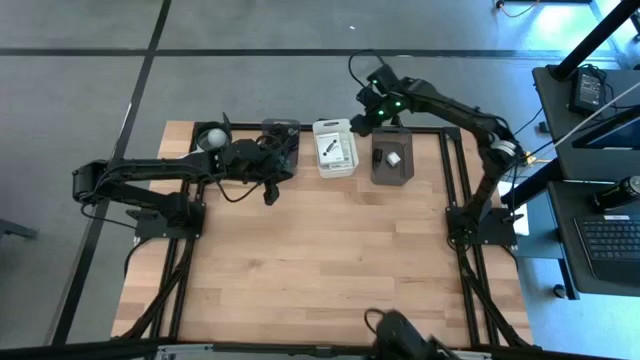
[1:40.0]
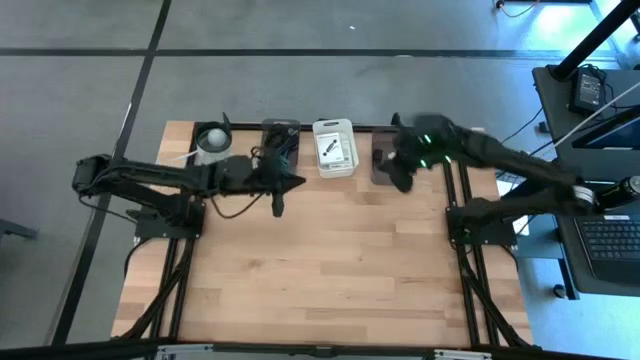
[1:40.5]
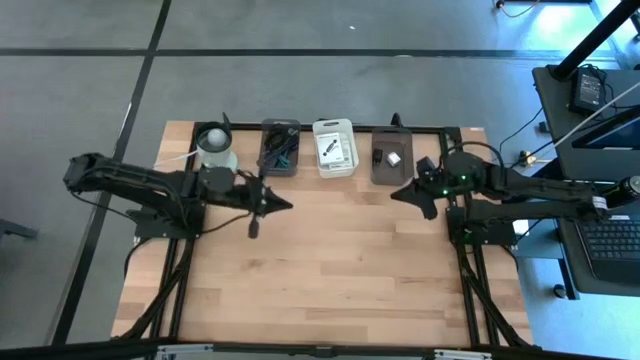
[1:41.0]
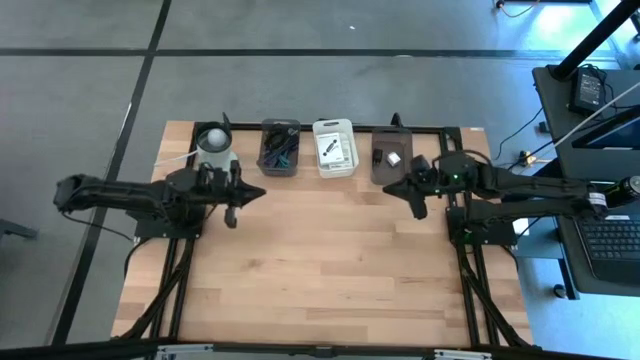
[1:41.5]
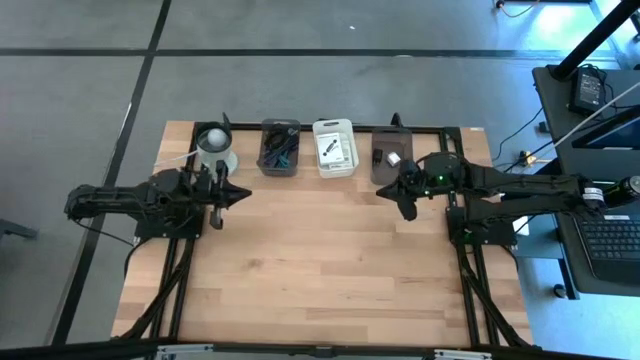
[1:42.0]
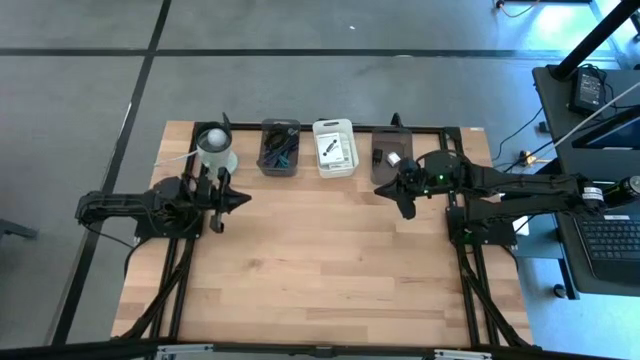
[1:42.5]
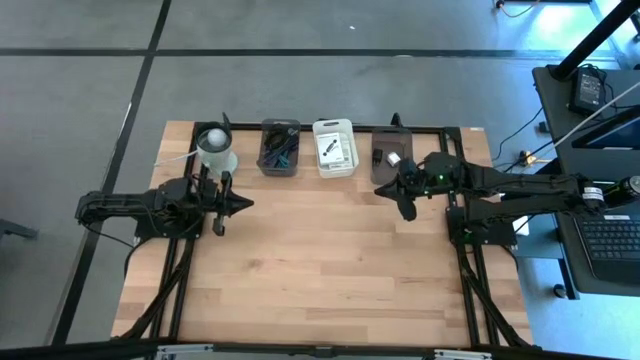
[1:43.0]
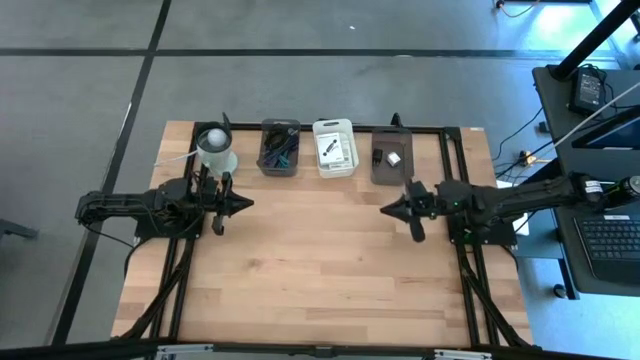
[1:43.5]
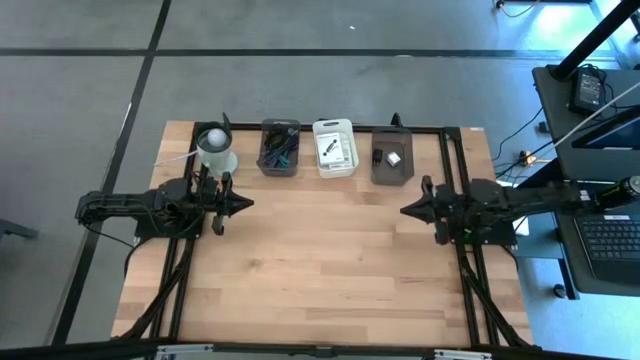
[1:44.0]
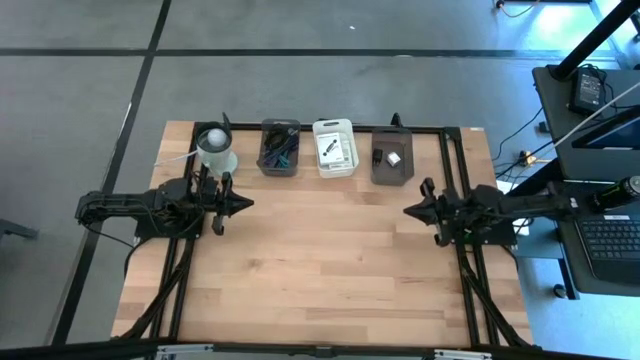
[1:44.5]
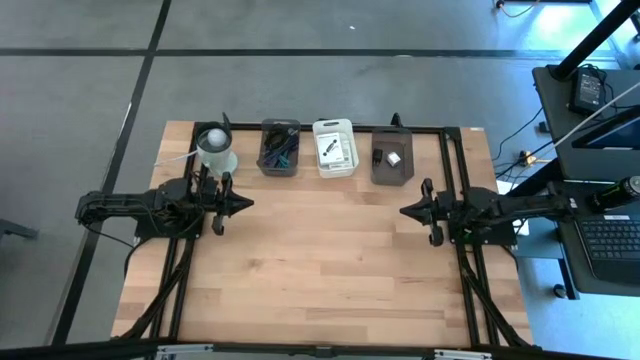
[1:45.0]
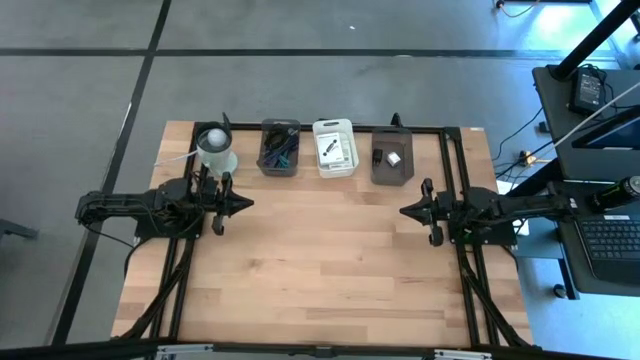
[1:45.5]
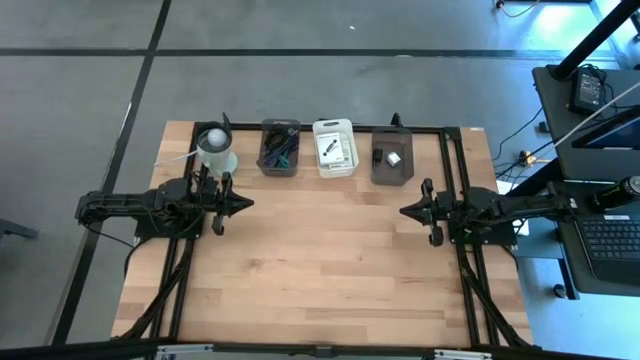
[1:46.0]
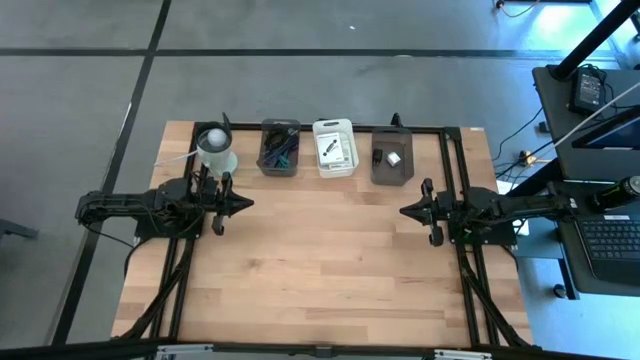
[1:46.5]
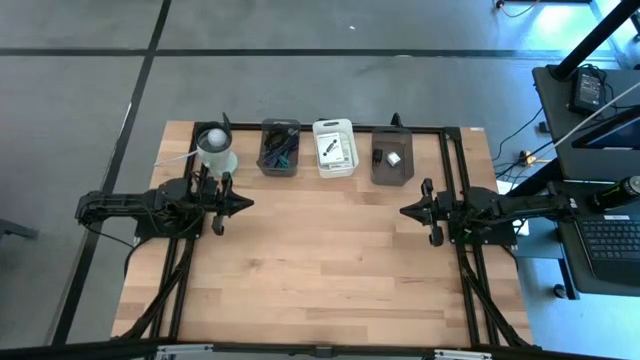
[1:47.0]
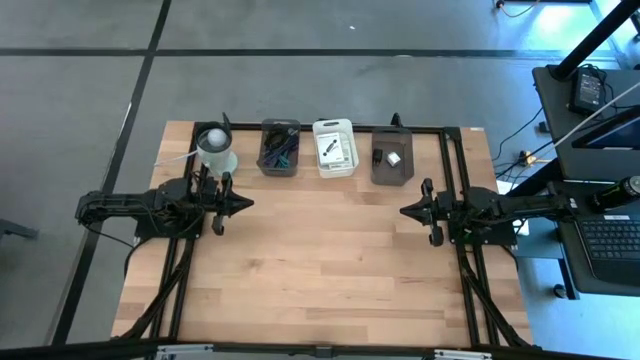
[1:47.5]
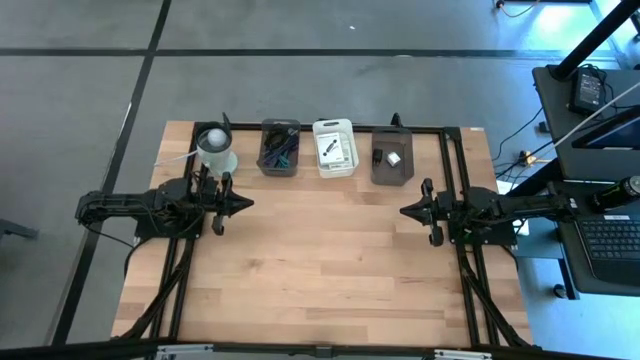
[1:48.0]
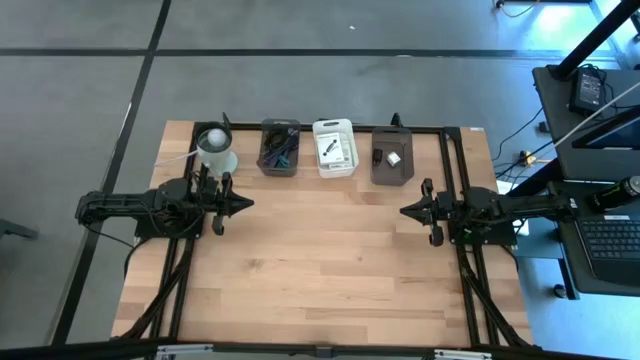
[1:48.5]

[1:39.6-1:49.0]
Task: Pick and place items into bin
Return to Home Position

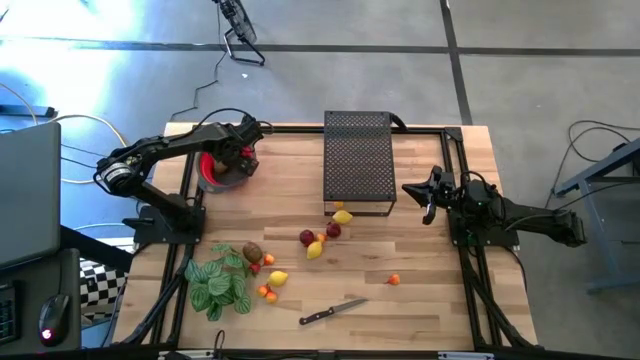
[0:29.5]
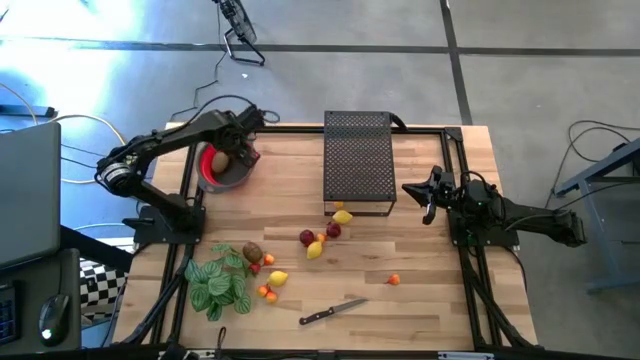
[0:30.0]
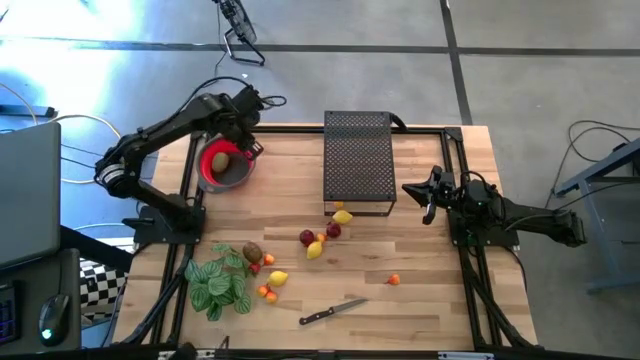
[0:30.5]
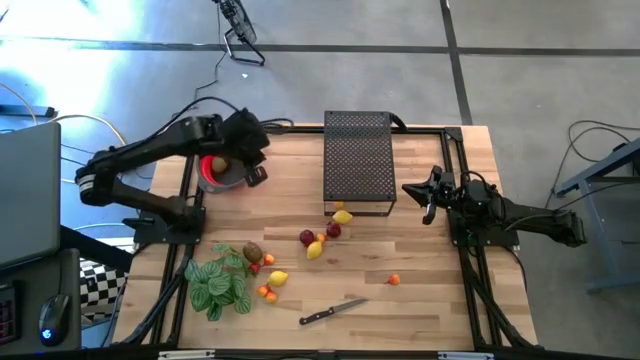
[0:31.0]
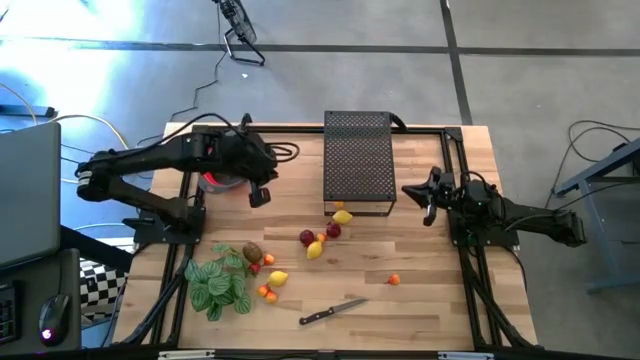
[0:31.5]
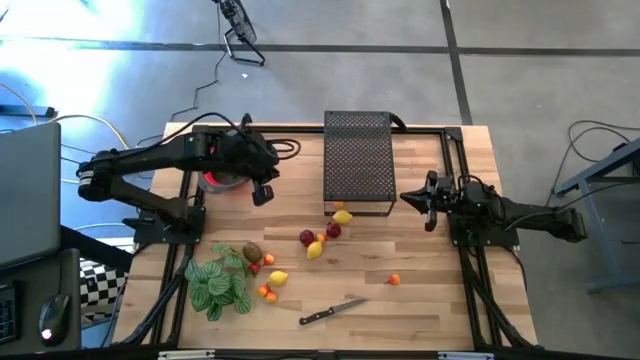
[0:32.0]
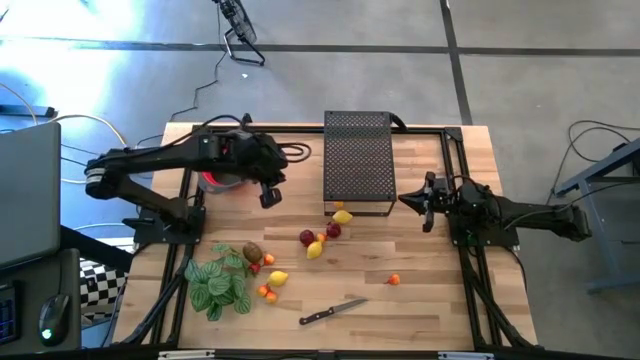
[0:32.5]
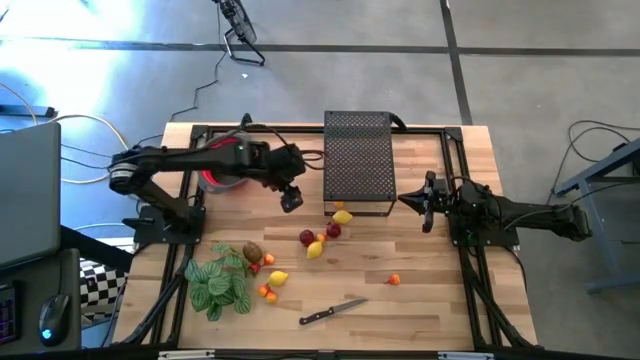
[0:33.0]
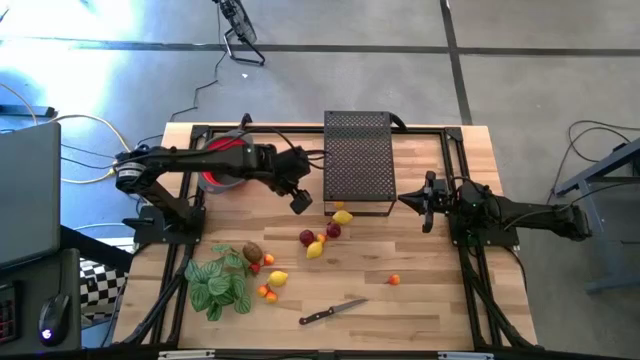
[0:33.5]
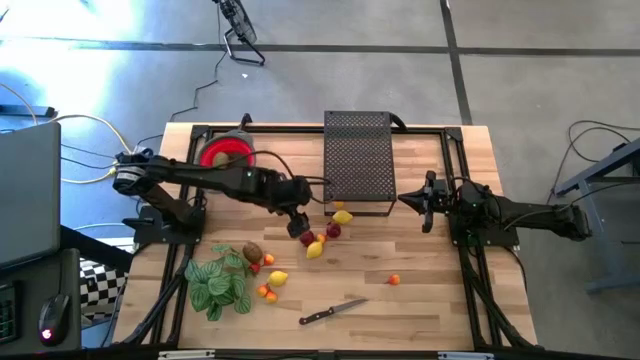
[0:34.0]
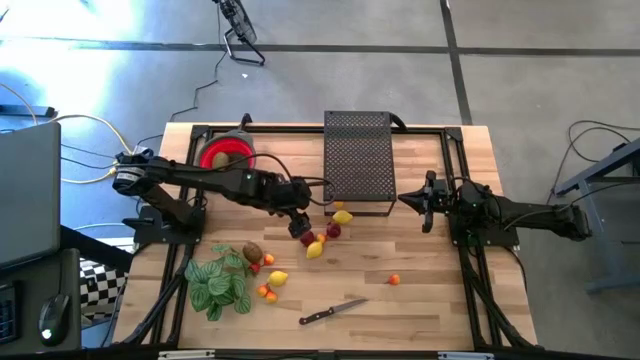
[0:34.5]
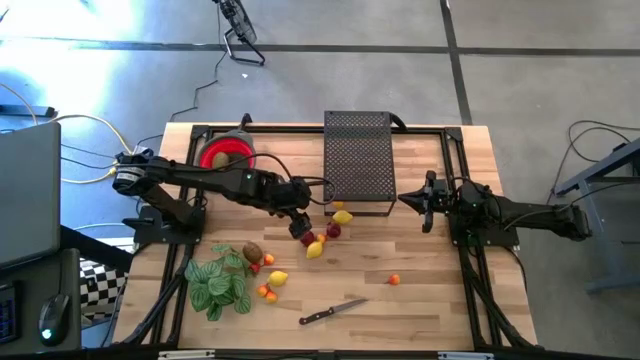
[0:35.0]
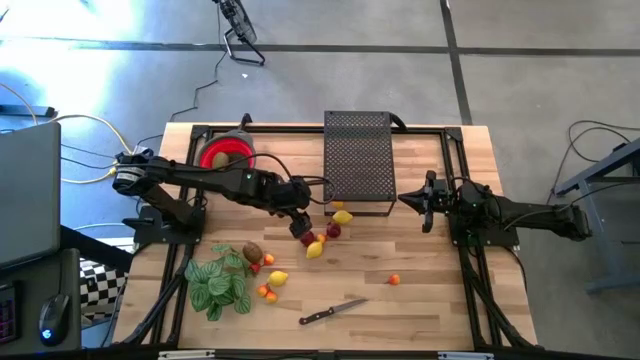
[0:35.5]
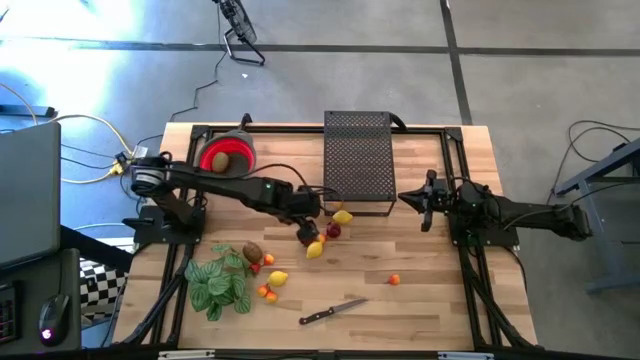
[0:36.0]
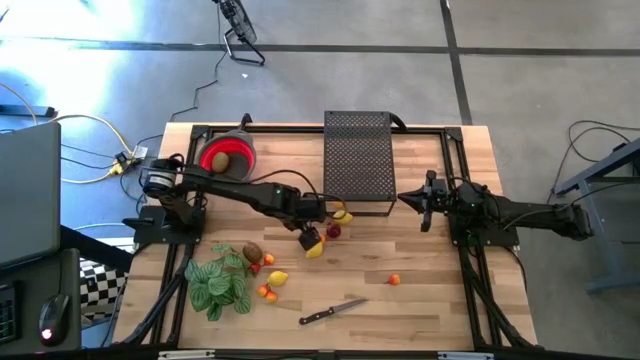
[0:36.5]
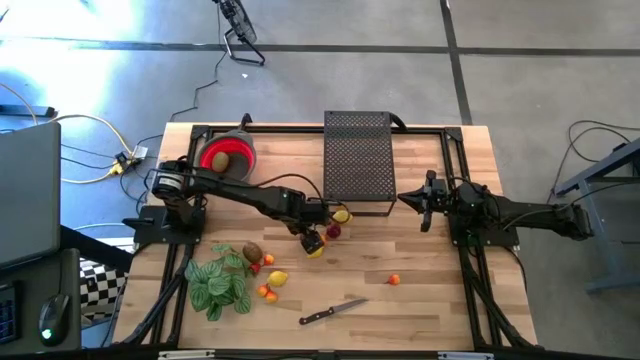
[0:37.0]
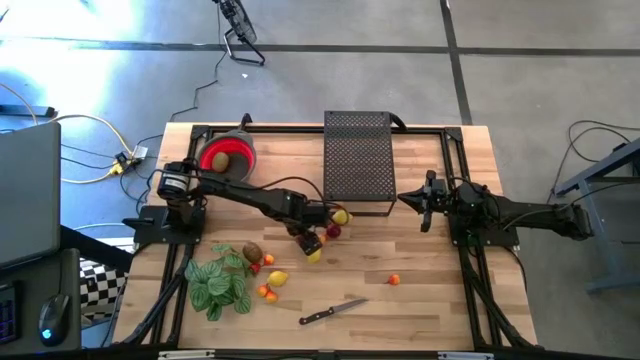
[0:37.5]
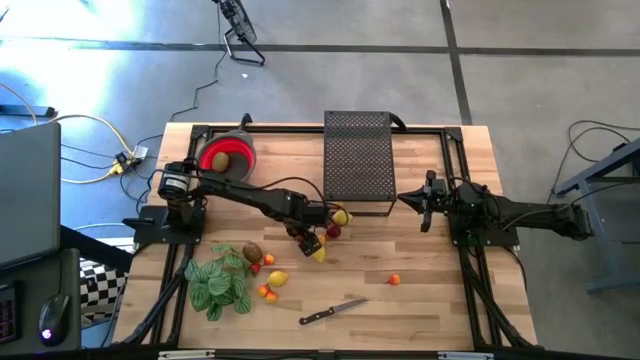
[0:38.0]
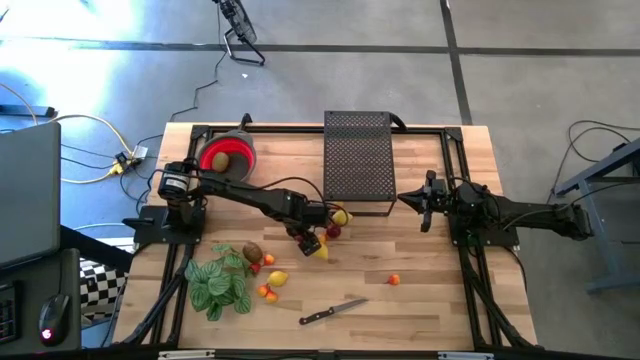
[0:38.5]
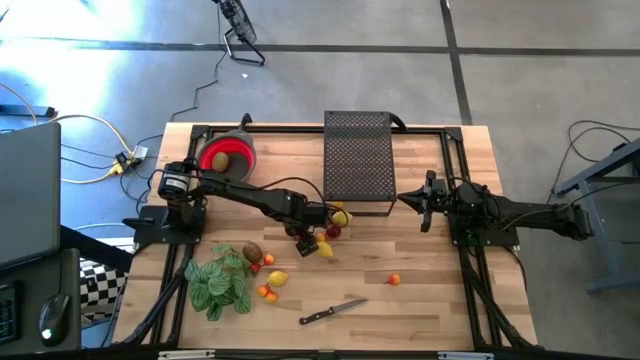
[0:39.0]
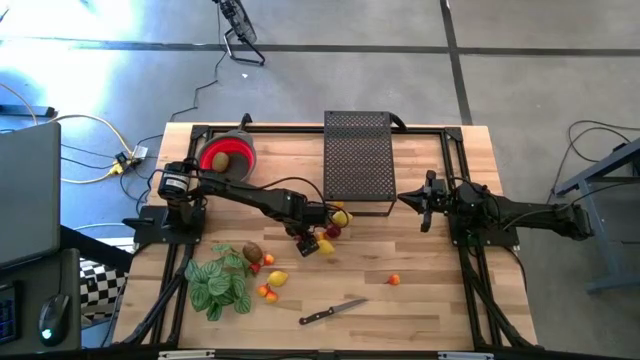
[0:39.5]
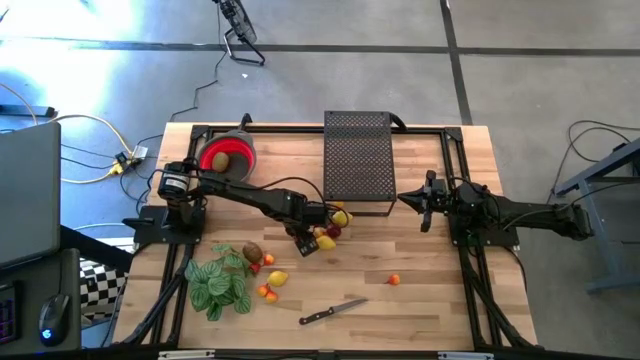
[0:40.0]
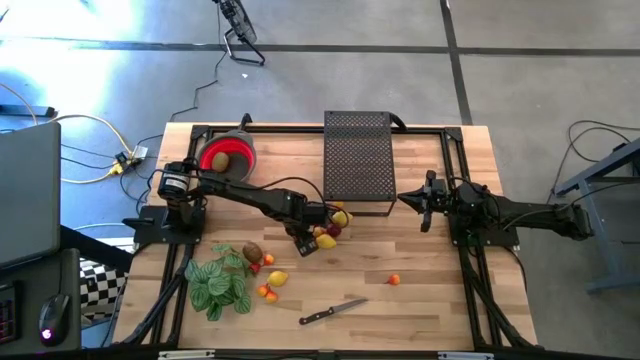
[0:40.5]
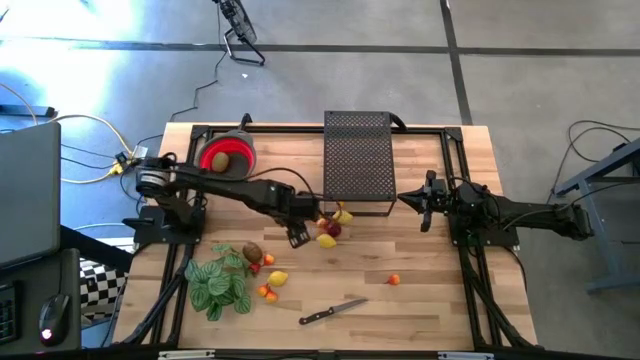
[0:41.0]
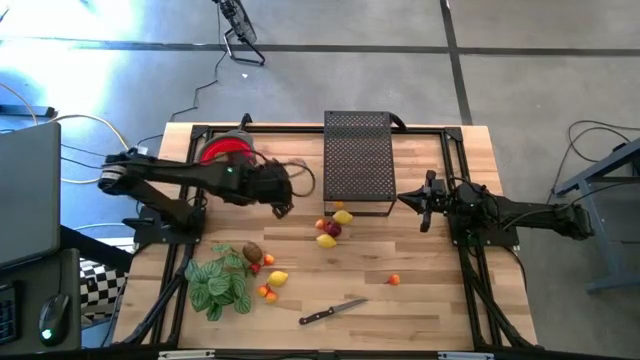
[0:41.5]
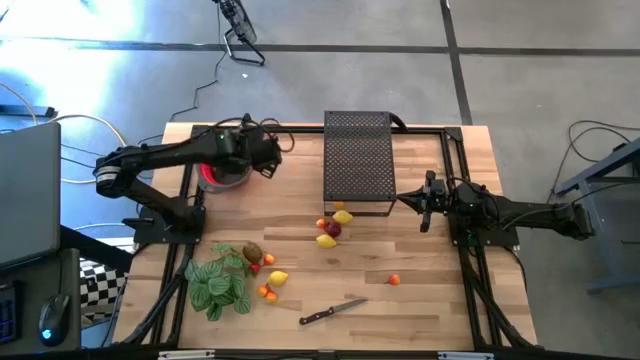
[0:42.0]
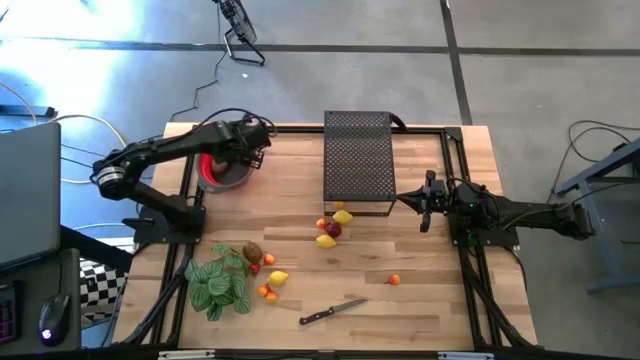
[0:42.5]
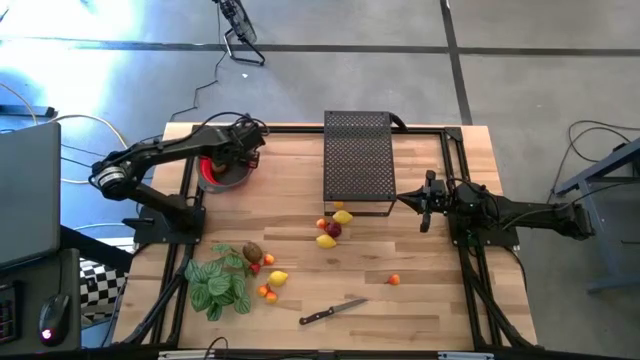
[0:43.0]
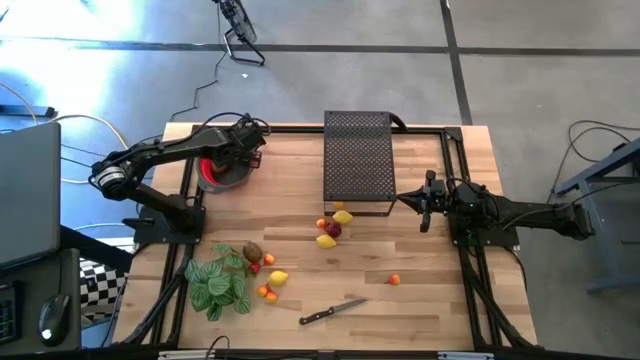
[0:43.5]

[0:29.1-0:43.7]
Task: Pick & Place Fruit
Put the left red pomegranate into the strainer bowl
